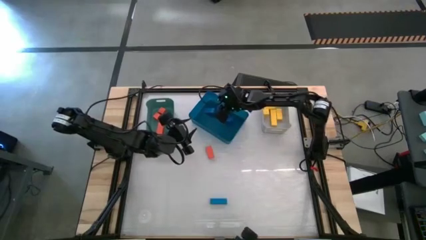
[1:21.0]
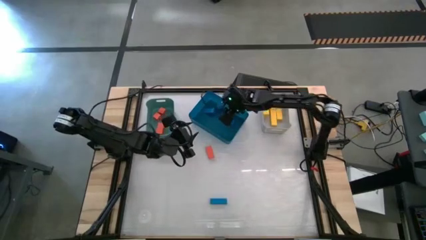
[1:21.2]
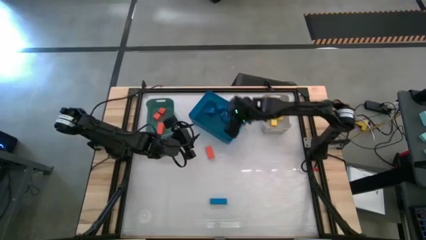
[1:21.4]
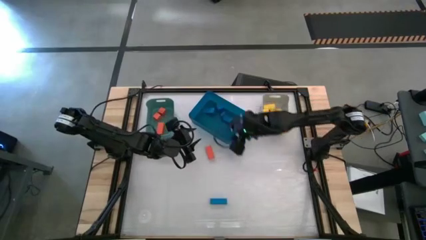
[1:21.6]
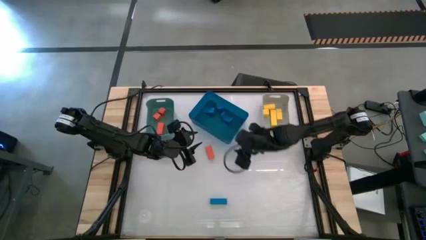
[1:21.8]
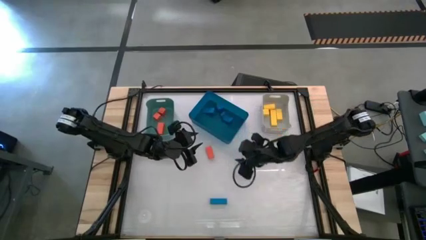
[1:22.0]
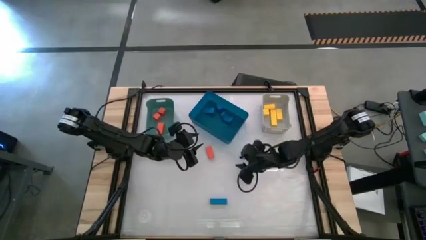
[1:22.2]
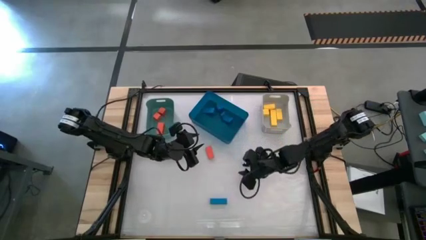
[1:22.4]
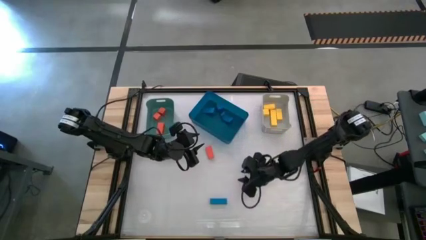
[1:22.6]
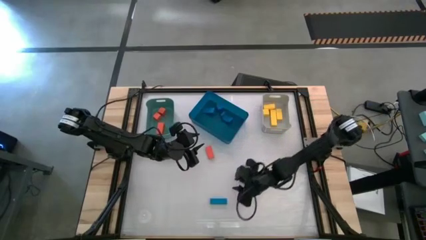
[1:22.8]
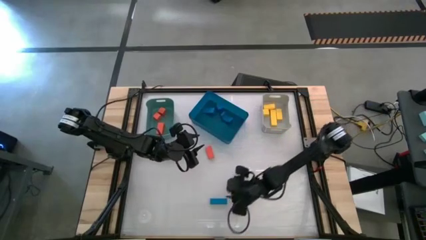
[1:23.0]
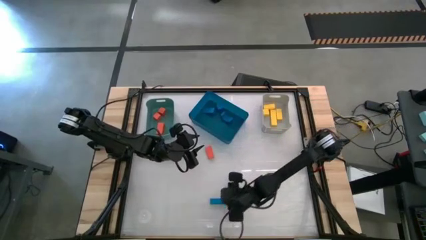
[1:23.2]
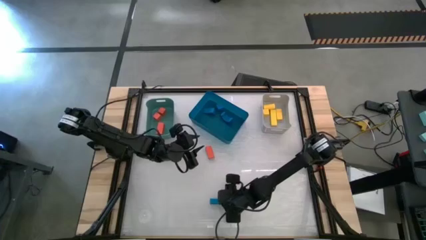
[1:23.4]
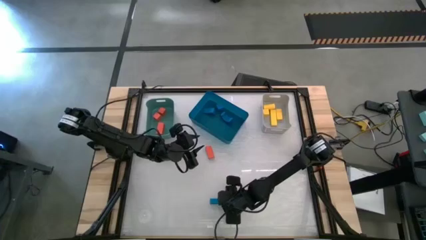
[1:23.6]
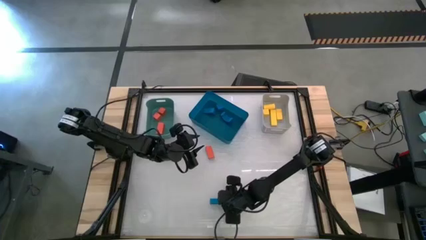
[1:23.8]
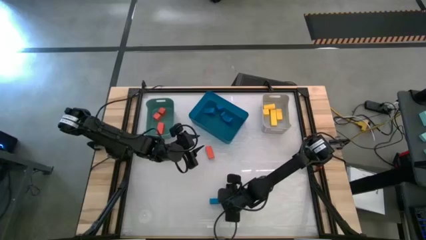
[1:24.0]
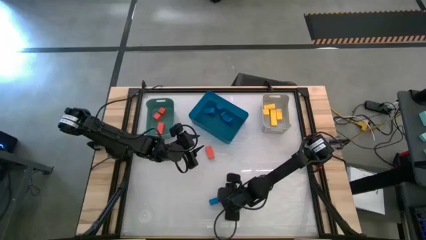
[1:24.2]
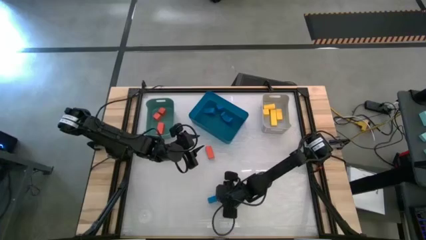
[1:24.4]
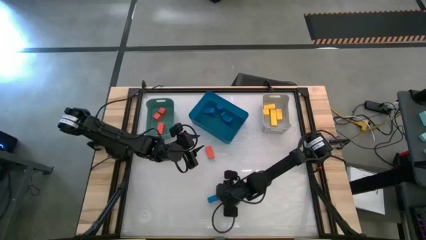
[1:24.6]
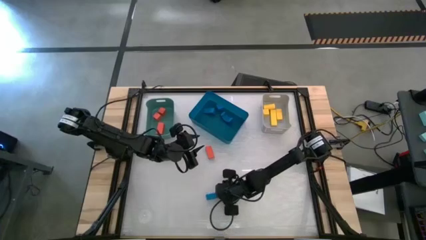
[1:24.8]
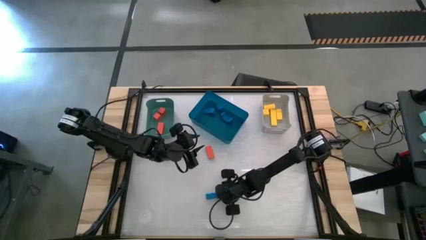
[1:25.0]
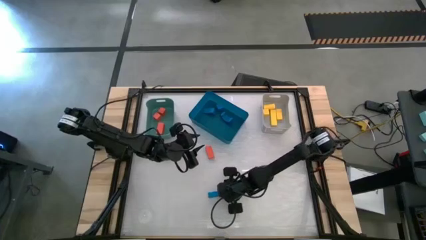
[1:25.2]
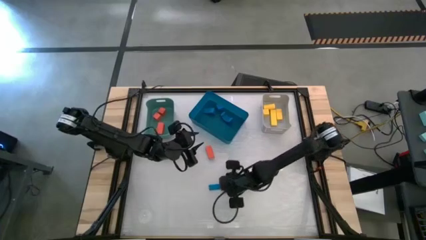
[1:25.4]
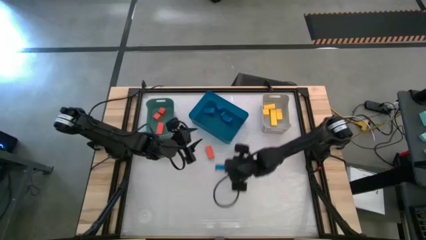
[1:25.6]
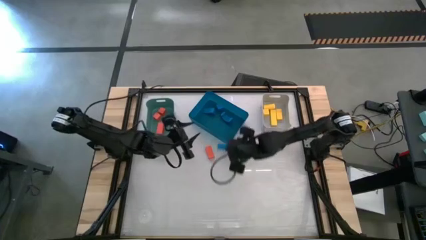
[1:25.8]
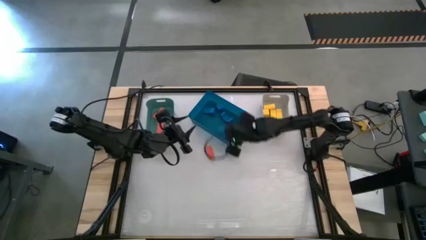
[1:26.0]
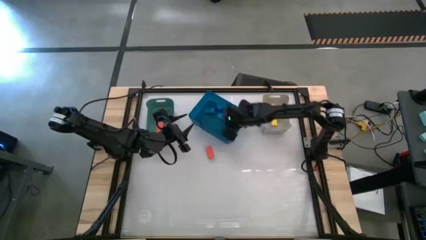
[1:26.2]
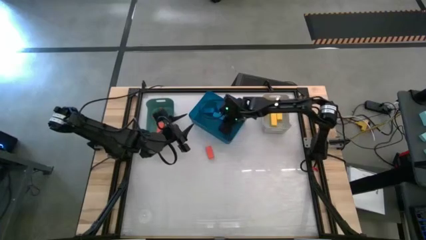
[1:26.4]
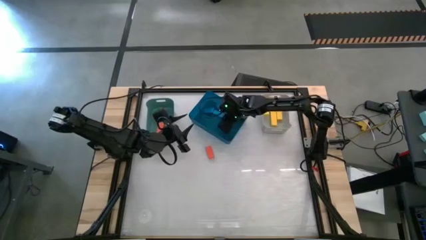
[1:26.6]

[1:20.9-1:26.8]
Task: Sort & place blocks by color
Put the blue block into the blue bin

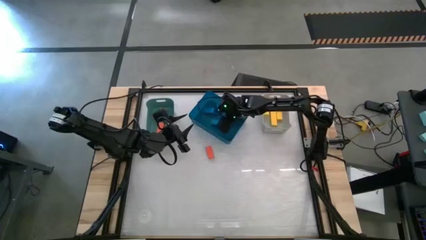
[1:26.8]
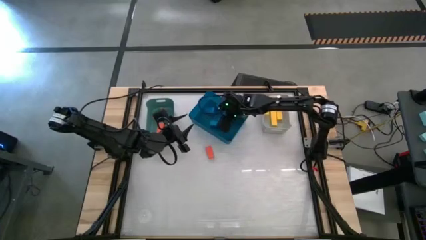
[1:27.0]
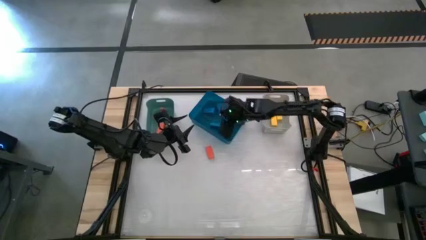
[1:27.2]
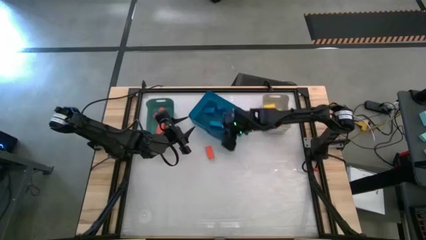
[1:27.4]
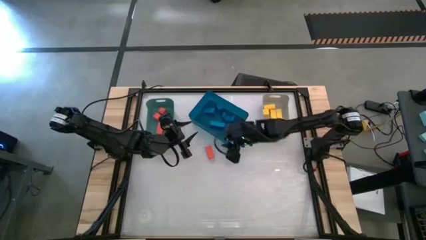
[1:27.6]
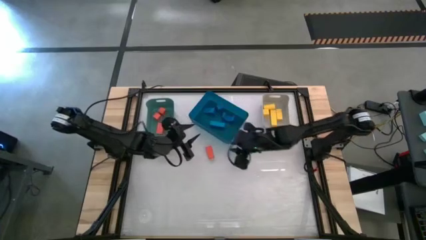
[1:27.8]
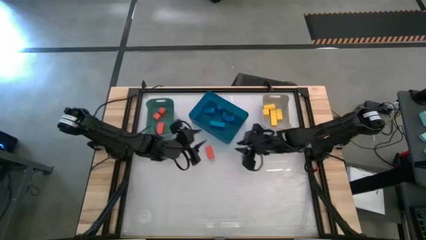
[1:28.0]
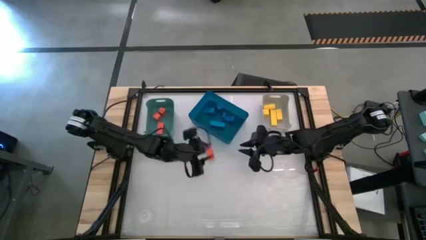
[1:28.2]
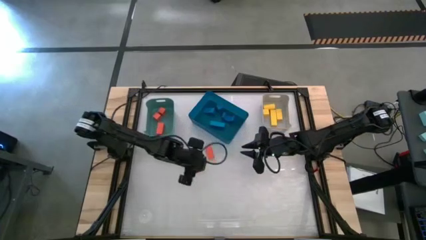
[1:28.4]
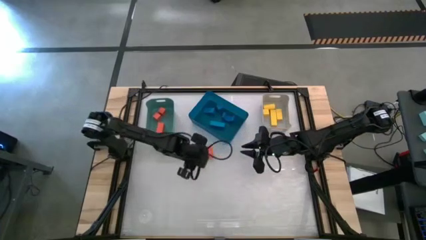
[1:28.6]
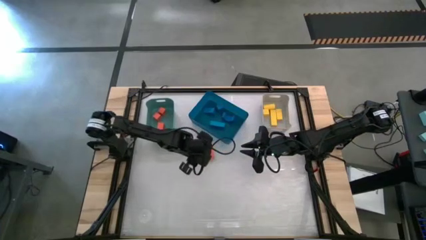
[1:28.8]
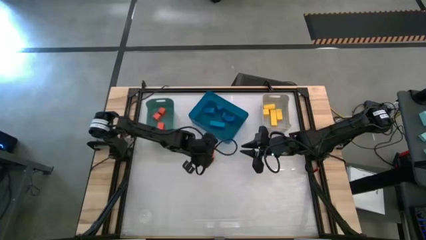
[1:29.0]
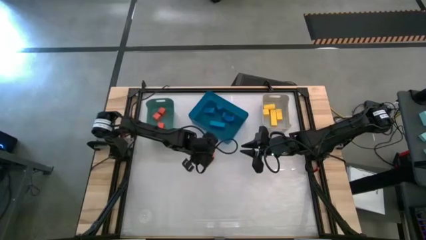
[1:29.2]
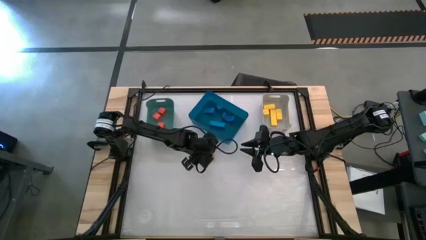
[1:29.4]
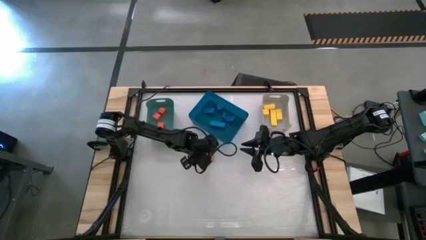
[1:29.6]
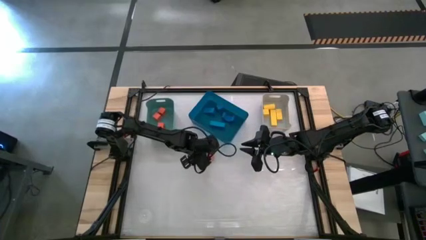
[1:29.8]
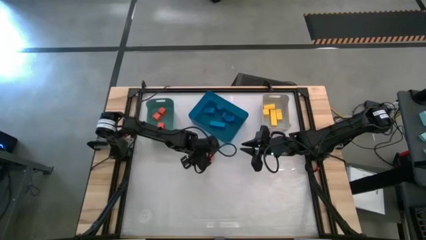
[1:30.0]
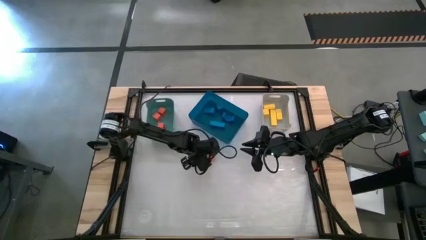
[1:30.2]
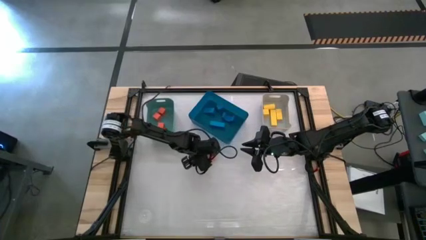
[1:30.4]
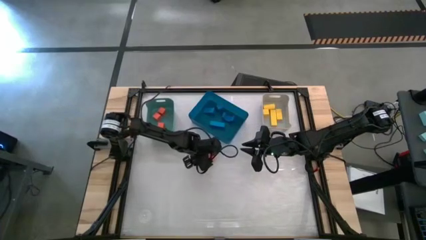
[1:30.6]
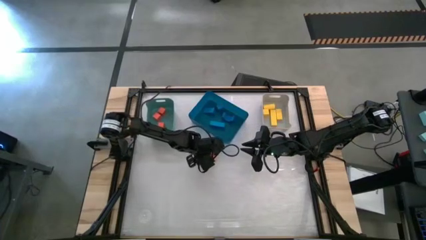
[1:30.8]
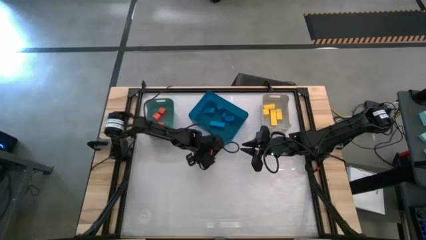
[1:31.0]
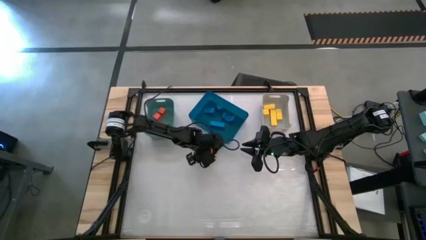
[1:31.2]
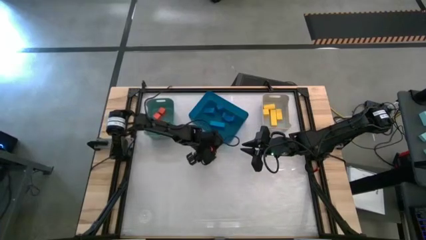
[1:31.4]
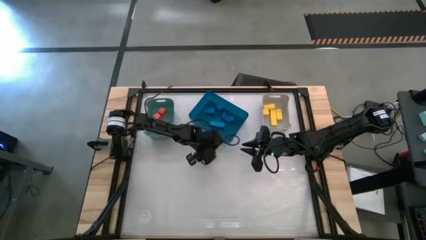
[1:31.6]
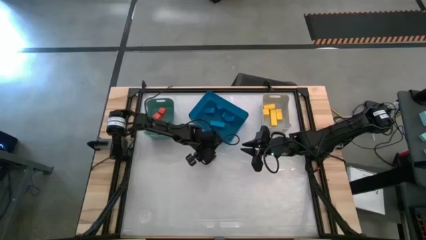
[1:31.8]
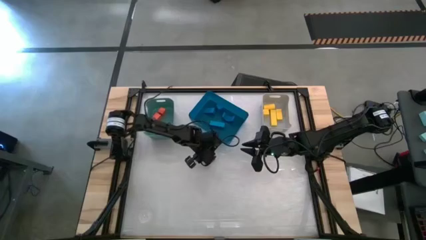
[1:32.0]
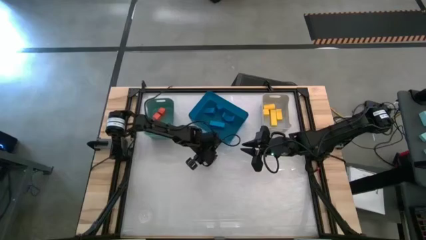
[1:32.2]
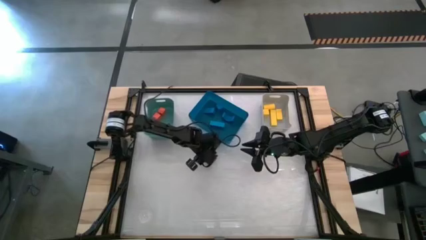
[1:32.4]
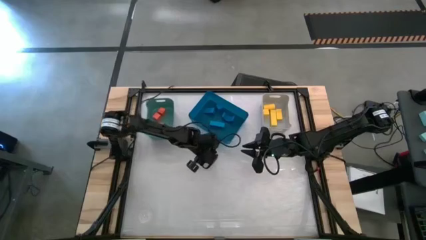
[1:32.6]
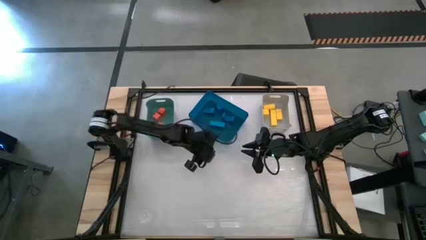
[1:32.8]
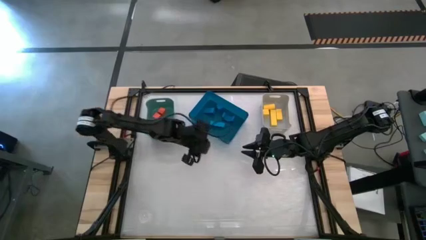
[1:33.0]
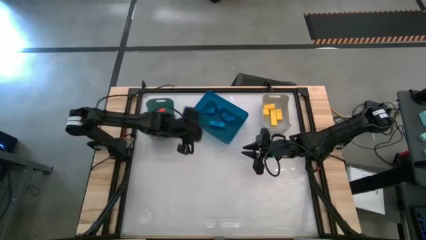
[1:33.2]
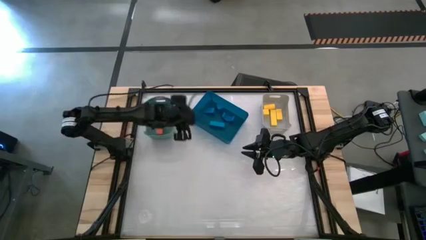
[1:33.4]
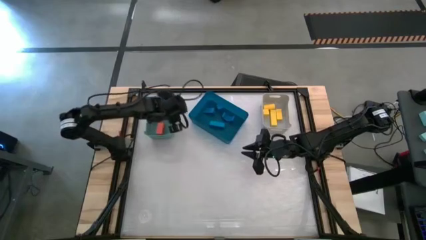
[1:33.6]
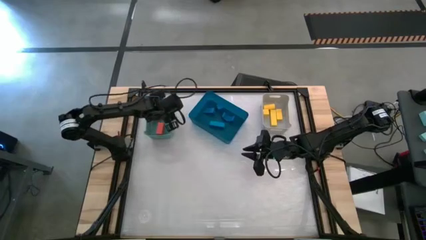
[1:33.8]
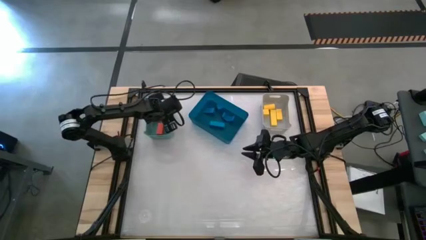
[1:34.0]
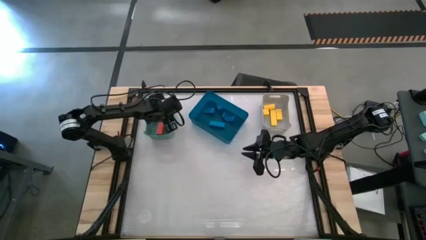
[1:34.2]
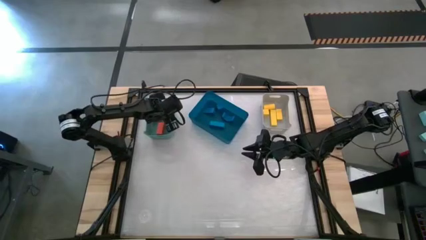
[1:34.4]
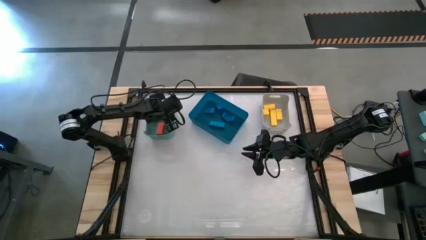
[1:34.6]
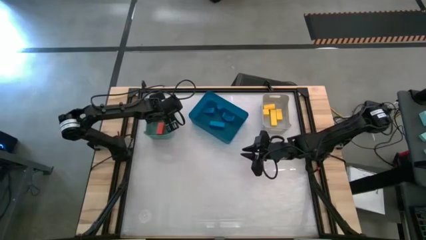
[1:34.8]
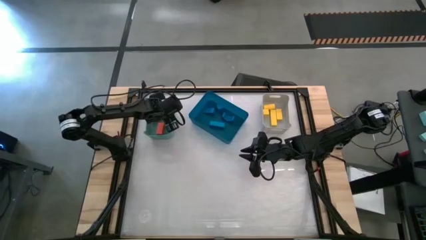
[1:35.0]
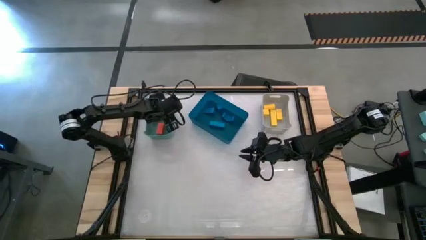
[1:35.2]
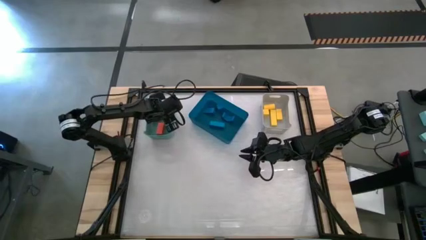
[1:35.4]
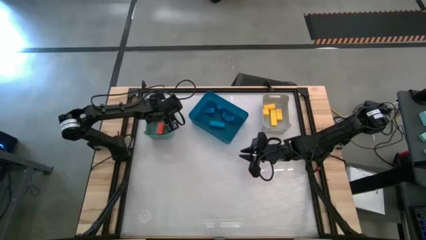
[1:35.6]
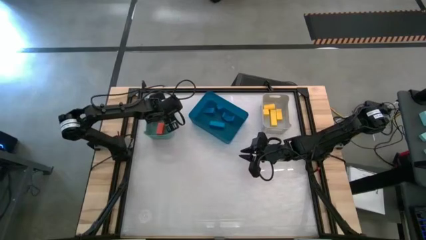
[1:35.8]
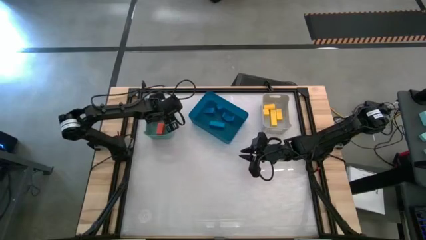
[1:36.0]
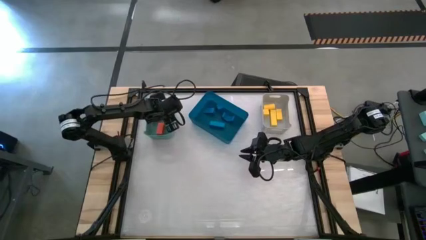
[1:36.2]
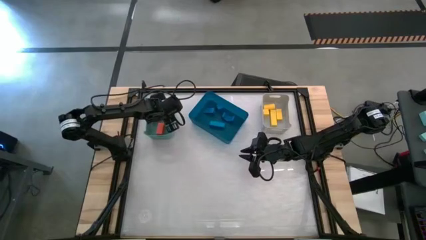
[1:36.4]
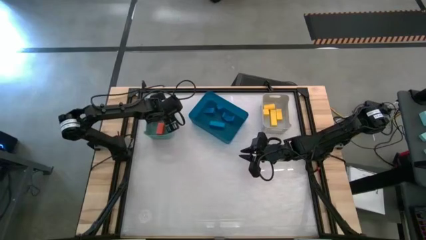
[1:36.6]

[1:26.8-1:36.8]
Put the orange block into the green bin

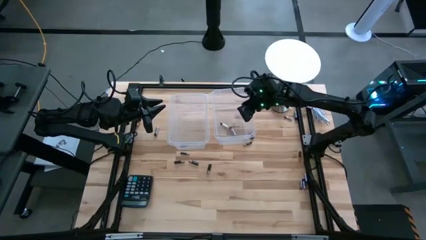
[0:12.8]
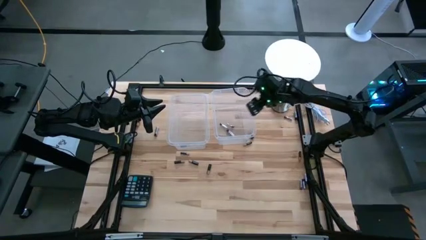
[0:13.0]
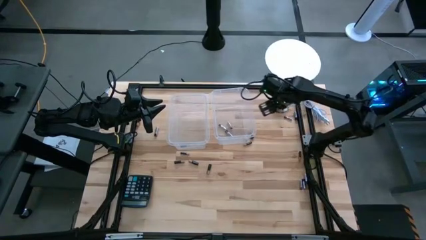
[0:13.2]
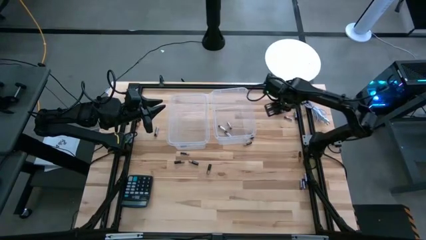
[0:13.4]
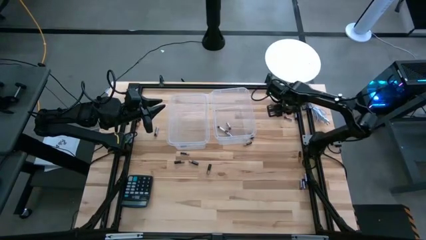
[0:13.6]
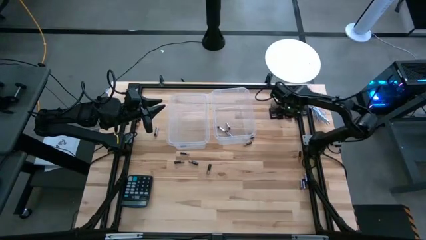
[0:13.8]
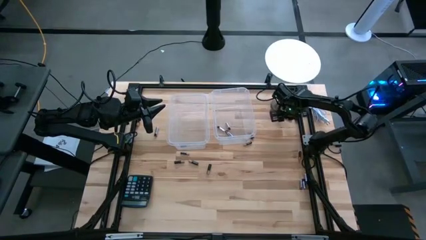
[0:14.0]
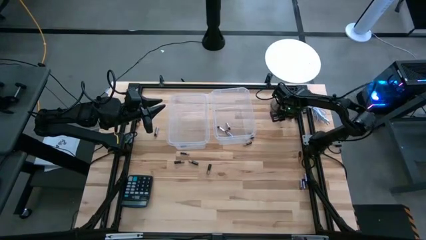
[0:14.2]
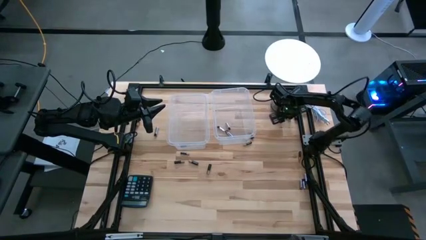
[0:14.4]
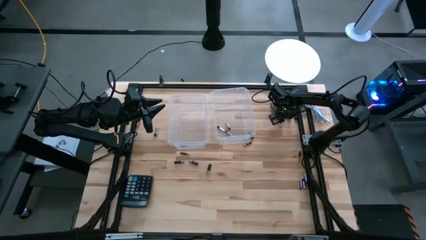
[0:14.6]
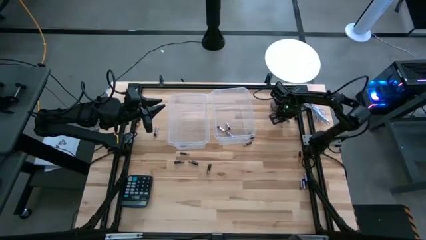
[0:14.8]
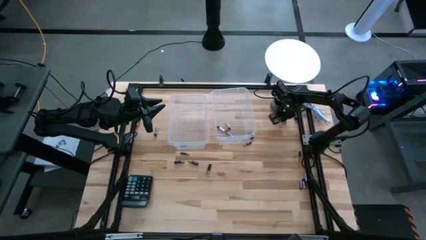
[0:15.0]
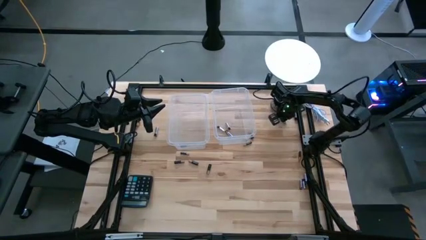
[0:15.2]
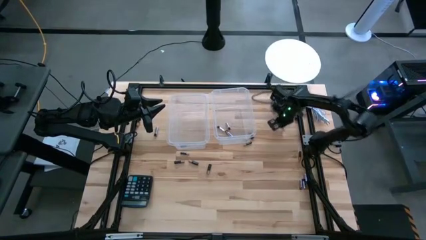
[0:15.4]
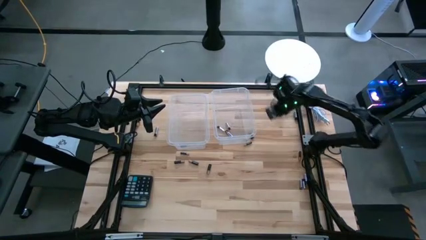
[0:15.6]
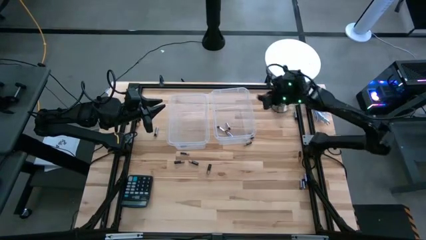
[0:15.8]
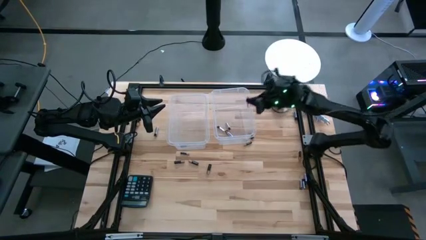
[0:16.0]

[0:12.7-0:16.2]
Task: Sort batteries
Put silver battery into the right transparent bin
